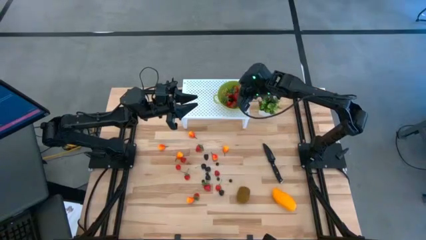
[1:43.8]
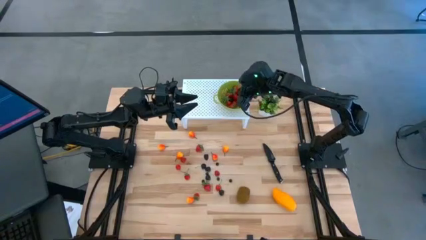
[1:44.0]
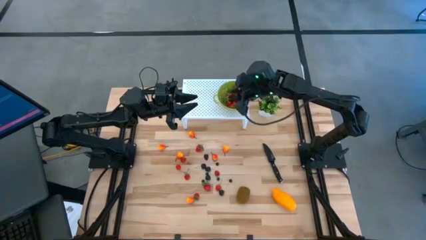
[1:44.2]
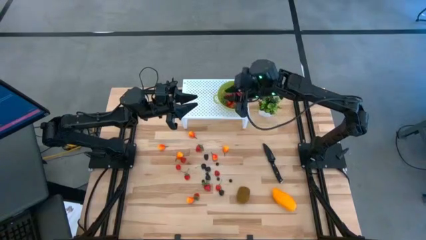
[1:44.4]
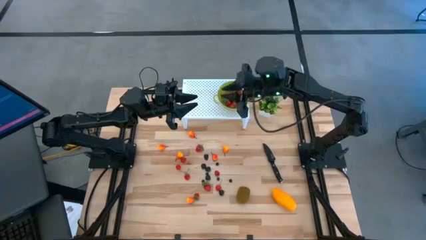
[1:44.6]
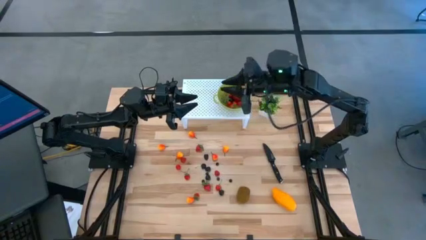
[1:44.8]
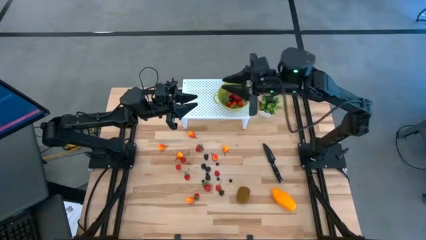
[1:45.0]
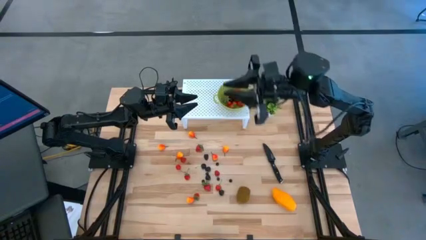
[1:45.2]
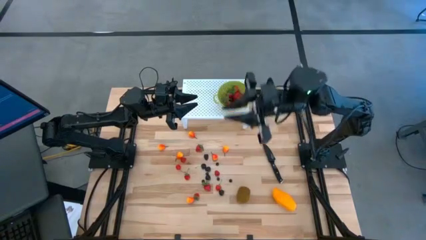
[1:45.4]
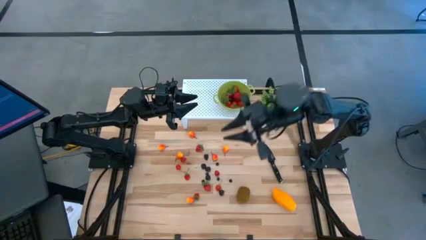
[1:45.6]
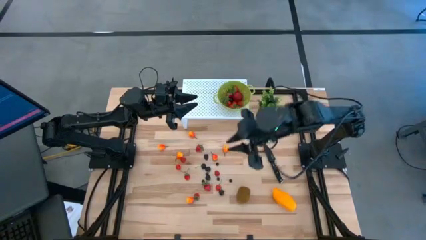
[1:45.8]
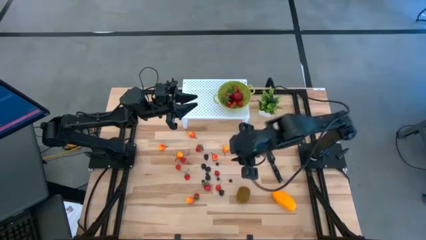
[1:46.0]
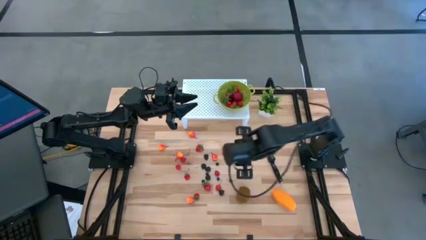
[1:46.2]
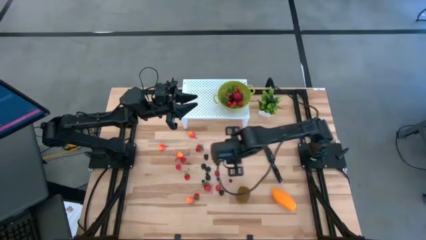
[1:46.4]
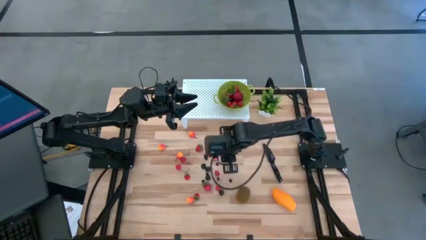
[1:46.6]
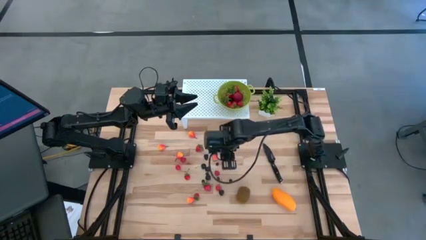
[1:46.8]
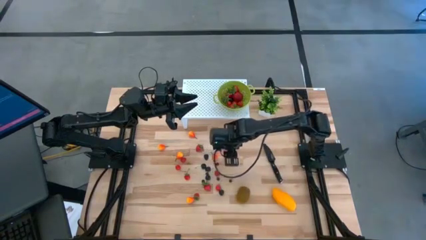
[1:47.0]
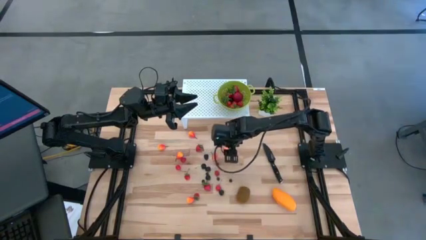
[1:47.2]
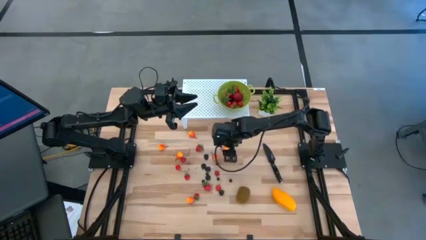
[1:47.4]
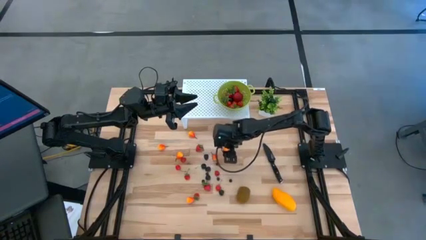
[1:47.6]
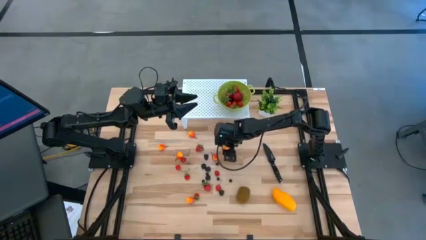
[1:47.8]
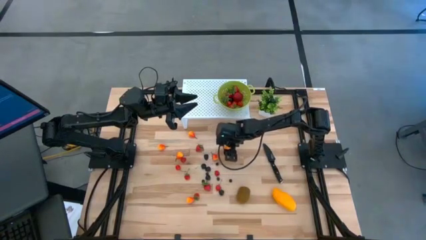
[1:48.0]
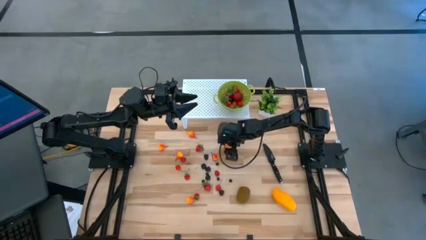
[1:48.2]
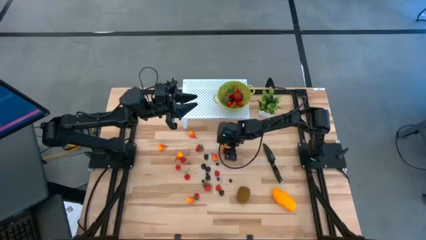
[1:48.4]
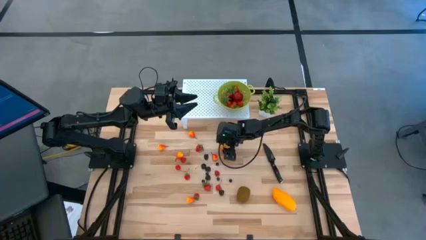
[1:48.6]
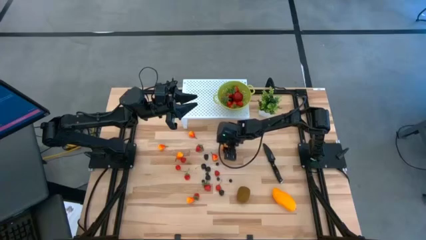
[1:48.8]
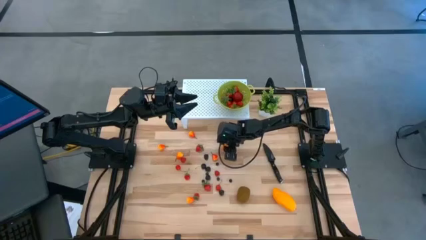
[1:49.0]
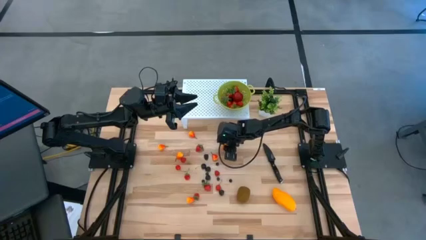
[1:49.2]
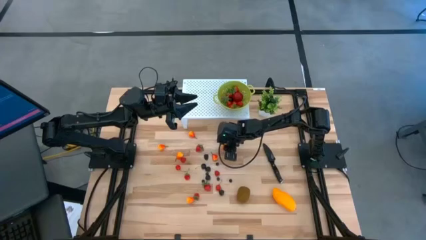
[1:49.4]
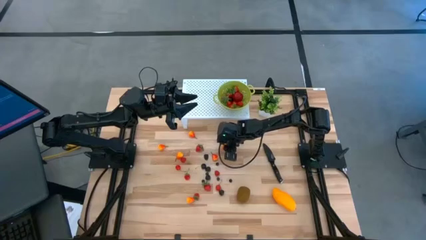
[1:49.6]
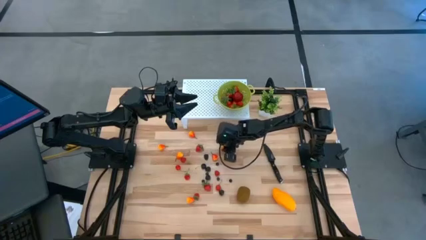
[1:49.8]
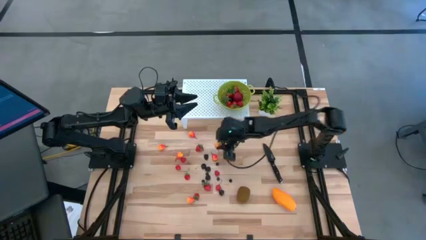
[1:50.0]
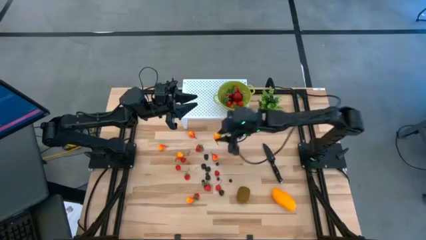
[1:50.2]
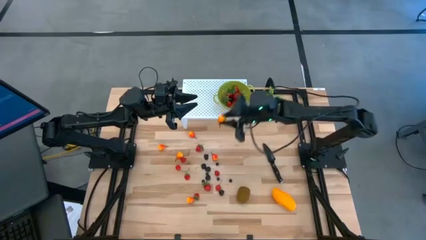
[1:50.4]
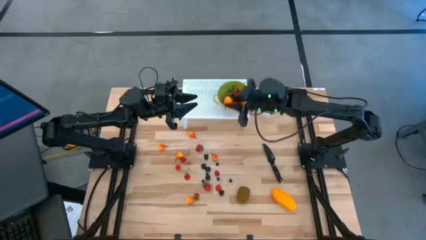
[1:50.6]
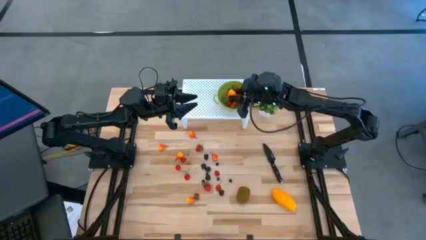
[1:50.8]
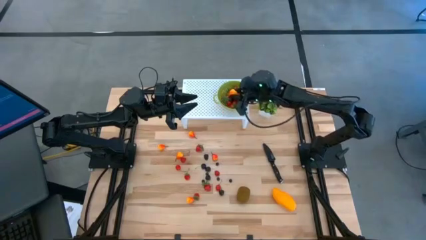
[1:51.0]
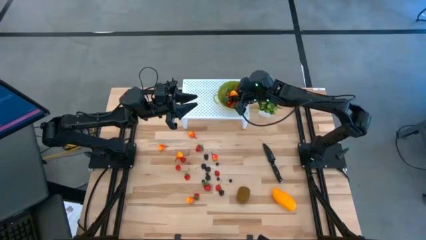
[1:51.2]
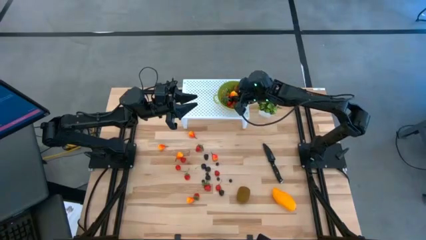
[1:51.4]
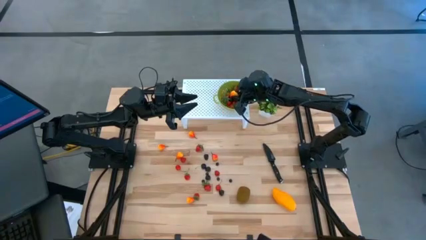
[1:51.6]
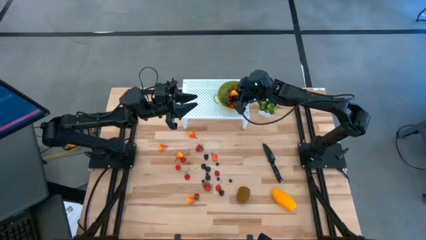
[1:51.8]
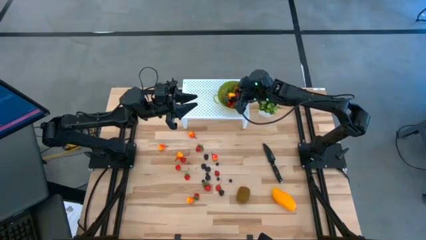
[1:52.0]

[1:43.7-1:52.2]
Task: Pick & Place Fruit
Put the yellow pear into the green strainer bowl

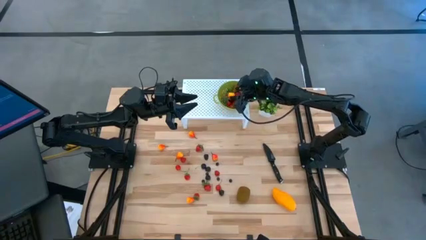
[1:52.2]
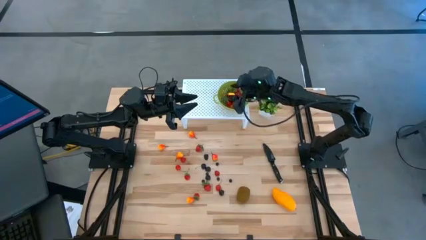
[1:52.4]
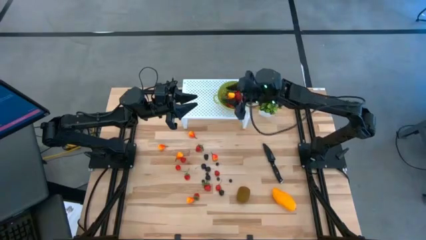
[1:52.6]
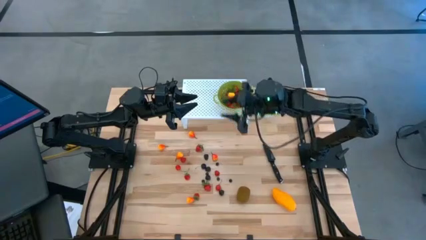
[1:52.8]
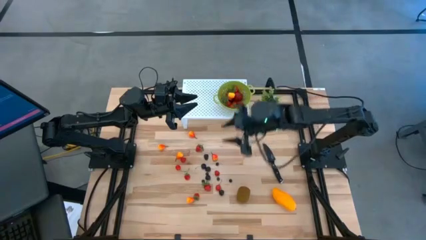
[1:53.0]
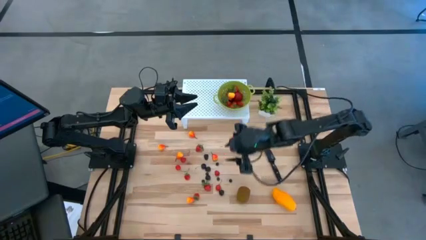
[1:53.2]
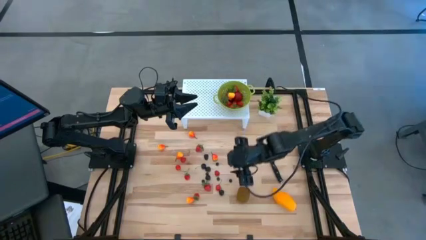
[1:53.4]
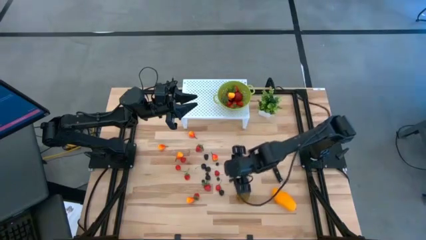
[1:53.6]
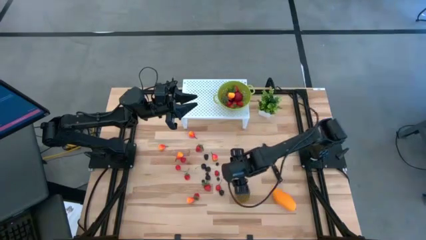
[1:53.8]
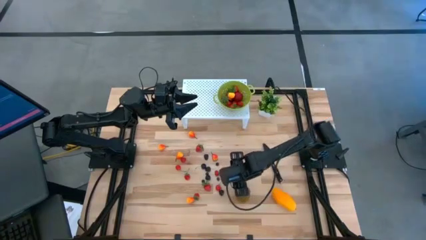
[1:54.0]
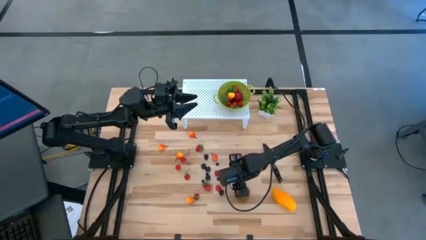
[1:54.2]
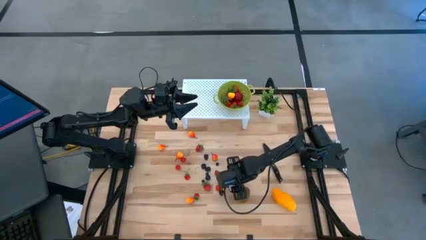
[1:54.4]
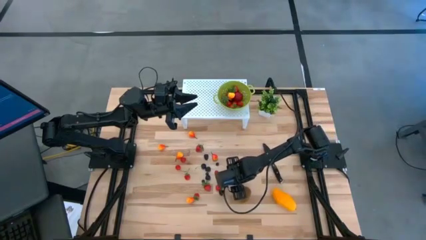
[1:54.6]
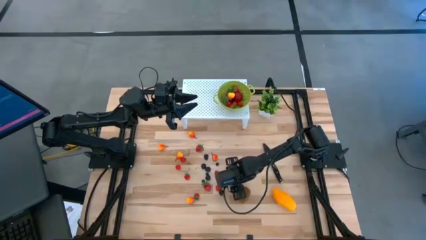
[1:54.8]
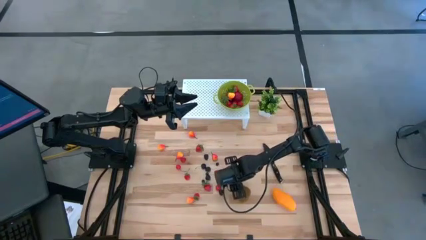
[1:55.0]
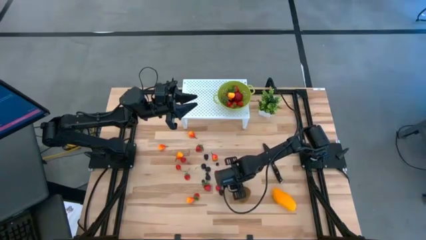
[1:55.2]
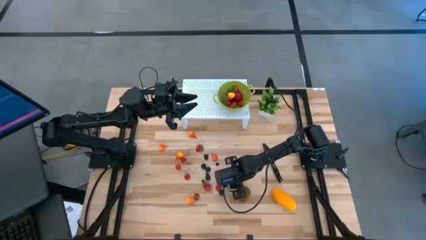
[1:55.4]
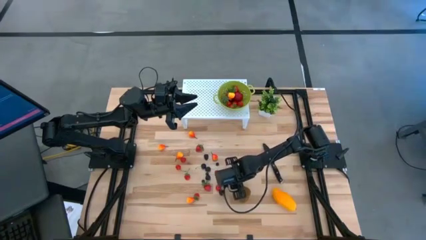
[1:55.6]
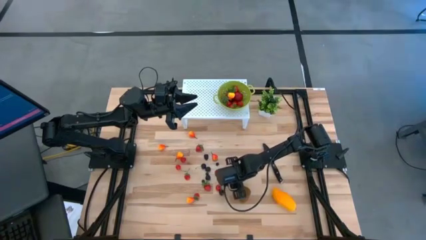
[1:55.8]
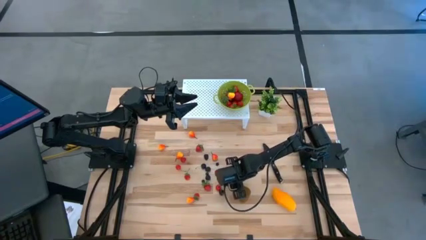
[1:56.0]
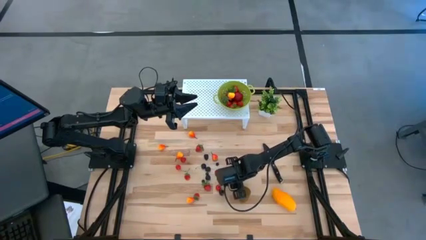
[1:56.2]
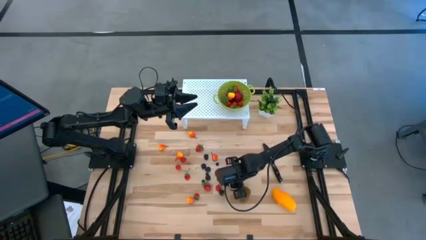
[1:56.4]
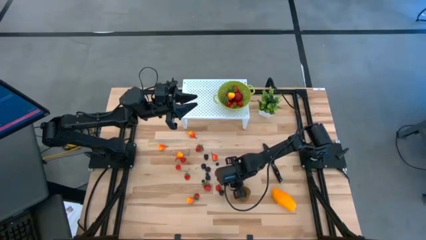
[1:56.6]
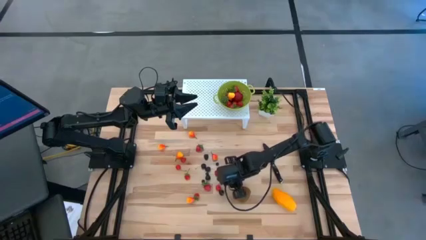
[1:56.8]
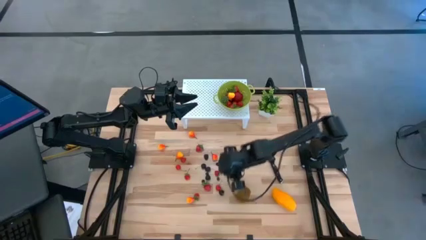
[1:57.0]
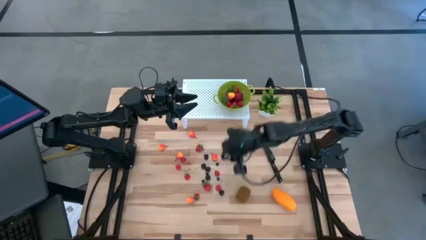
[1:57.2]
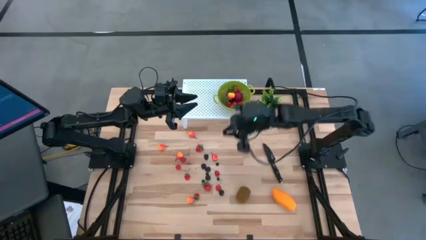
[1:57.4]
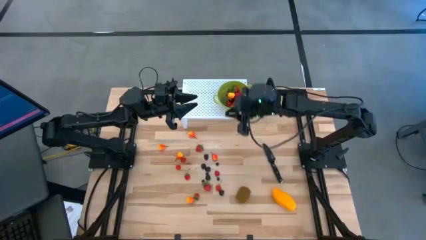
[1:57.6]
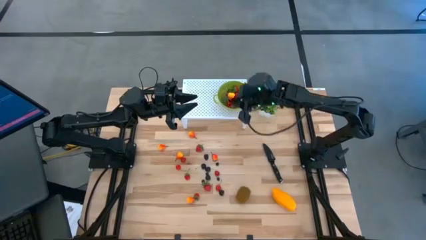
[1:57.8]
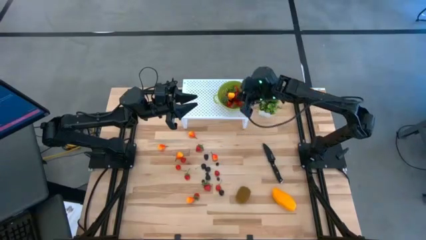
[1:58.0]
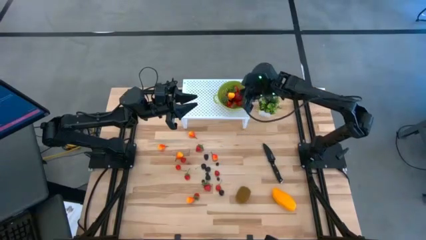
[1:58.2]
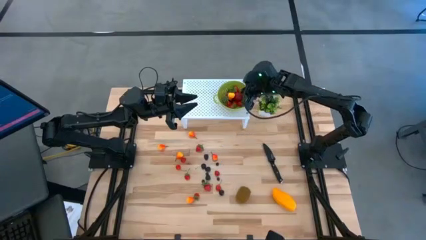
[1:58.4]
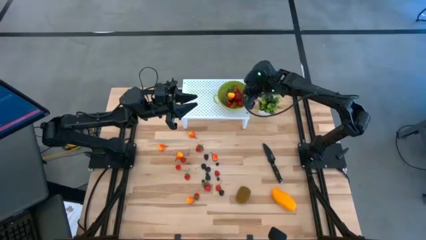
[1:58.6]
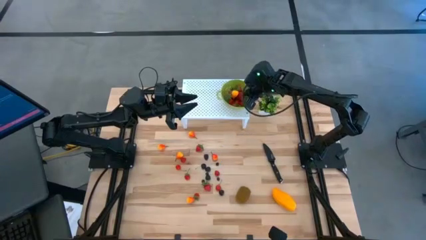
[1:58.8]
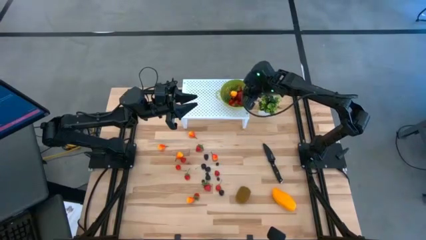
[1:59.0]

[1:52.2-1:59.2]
Put the black blueberry into the green strainer bowl
